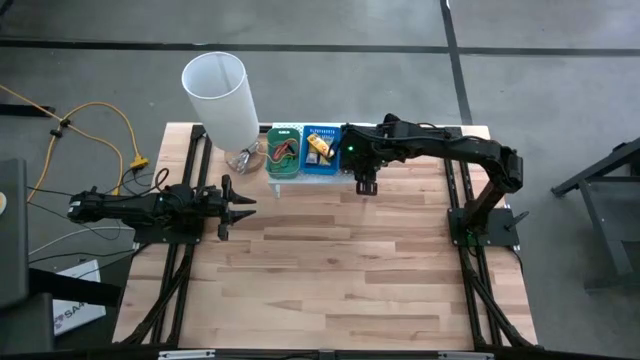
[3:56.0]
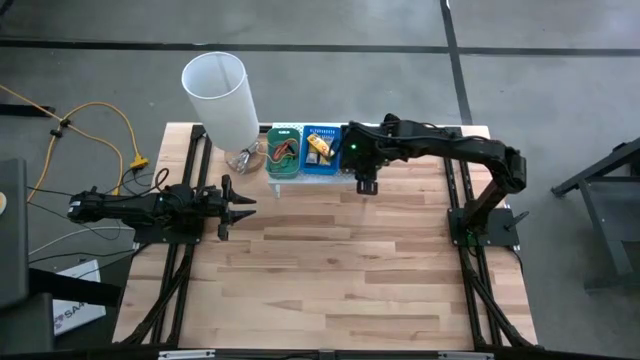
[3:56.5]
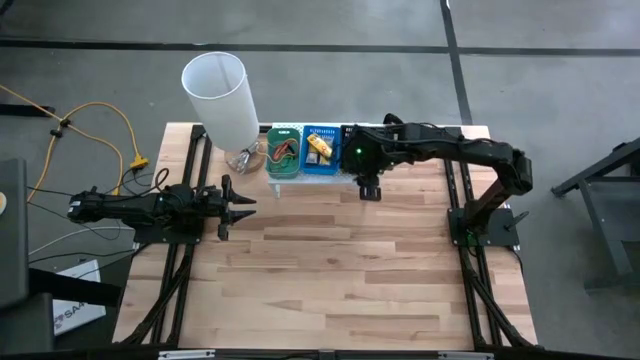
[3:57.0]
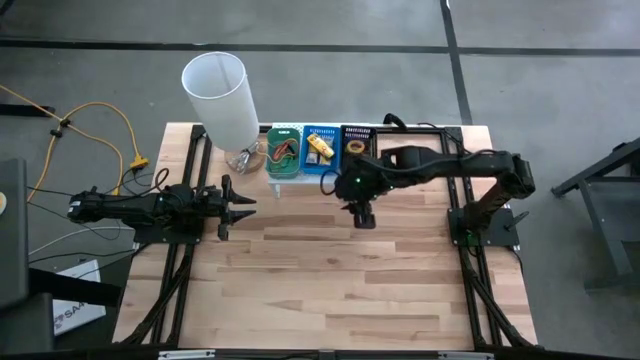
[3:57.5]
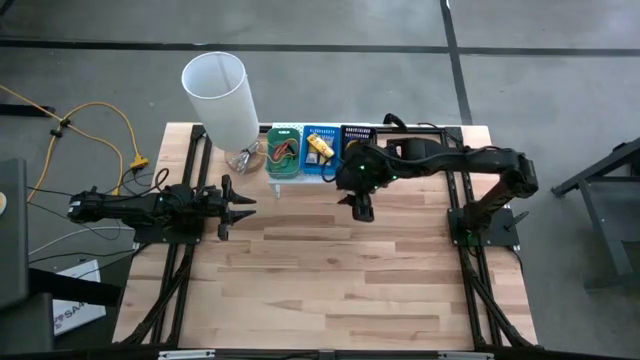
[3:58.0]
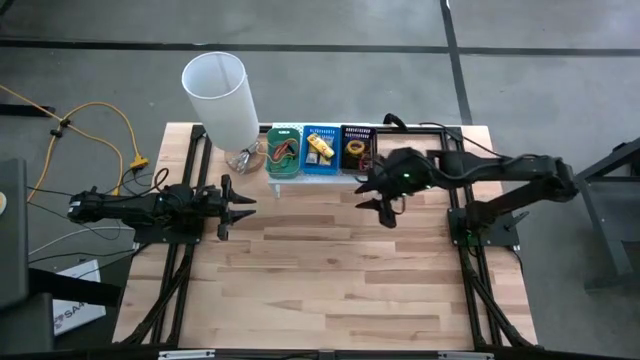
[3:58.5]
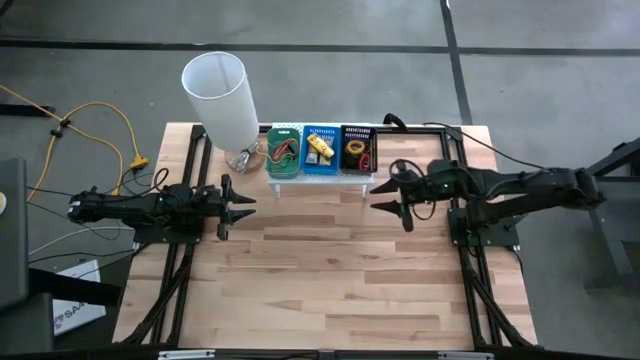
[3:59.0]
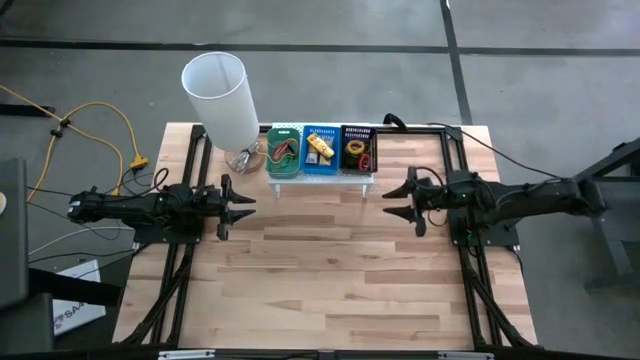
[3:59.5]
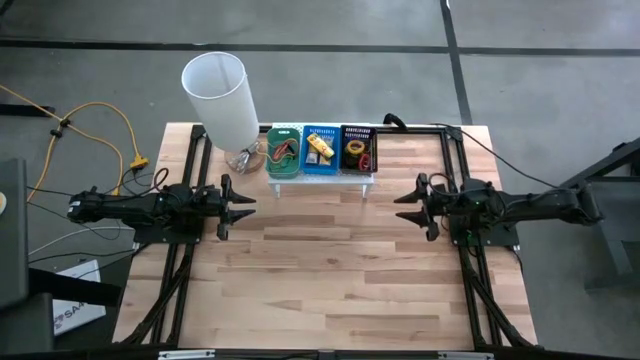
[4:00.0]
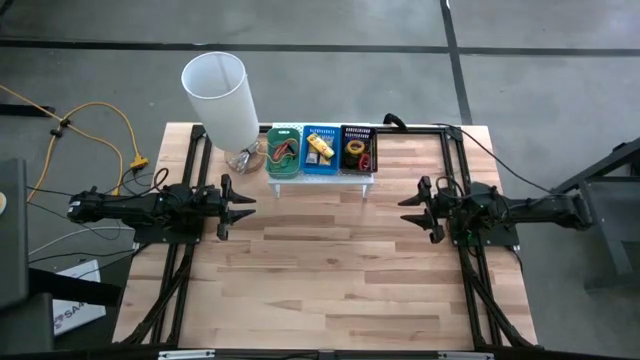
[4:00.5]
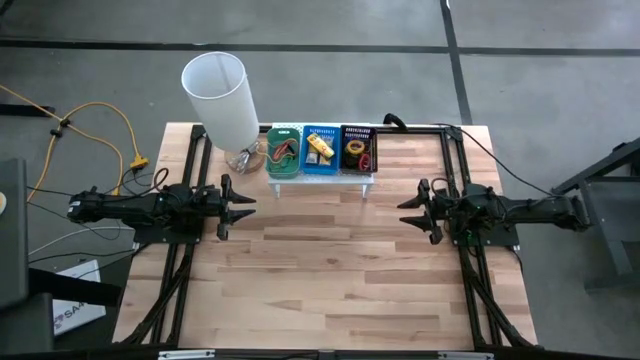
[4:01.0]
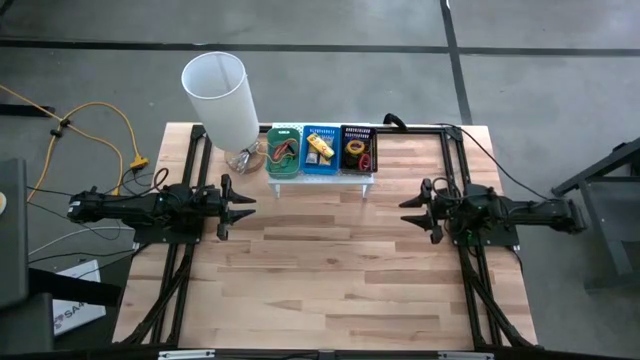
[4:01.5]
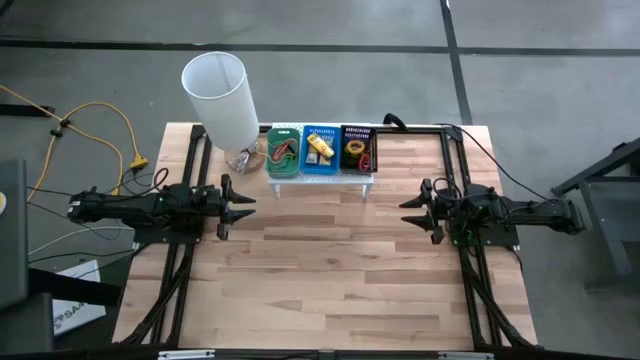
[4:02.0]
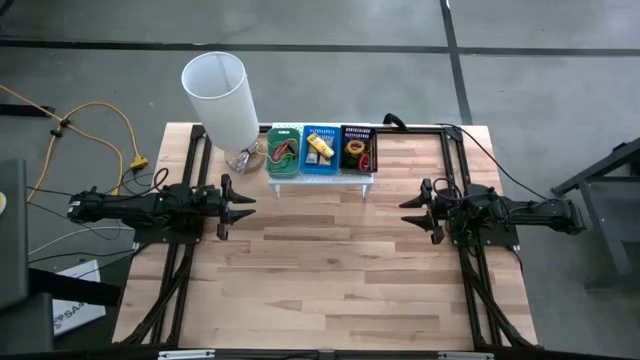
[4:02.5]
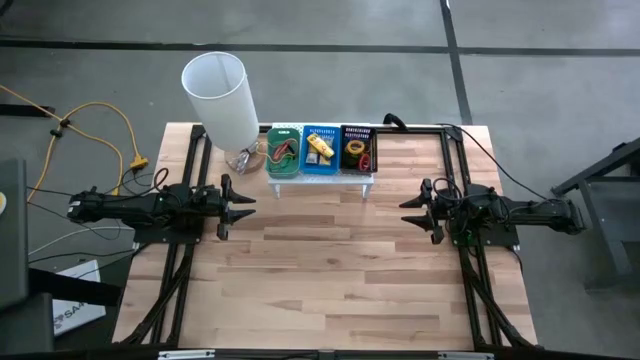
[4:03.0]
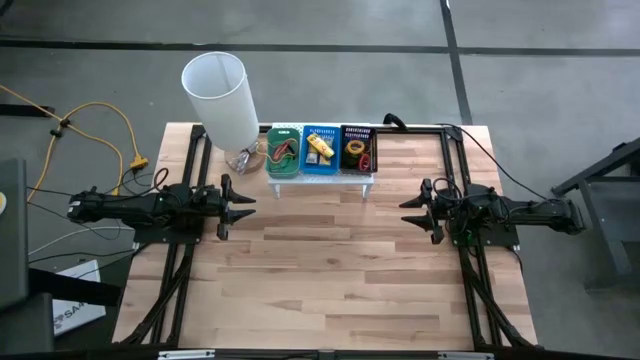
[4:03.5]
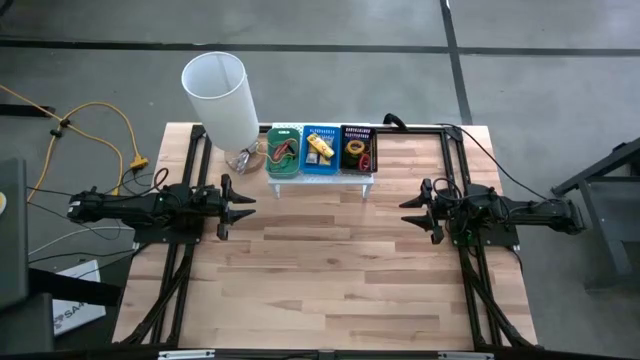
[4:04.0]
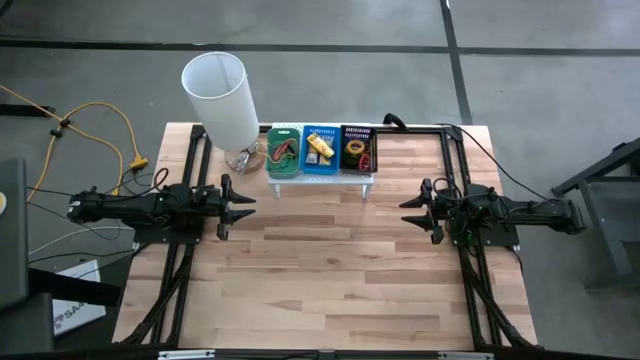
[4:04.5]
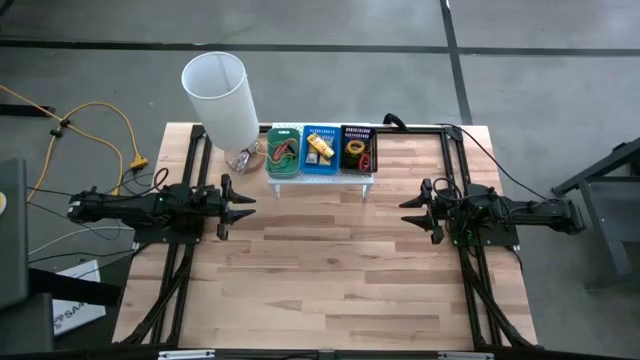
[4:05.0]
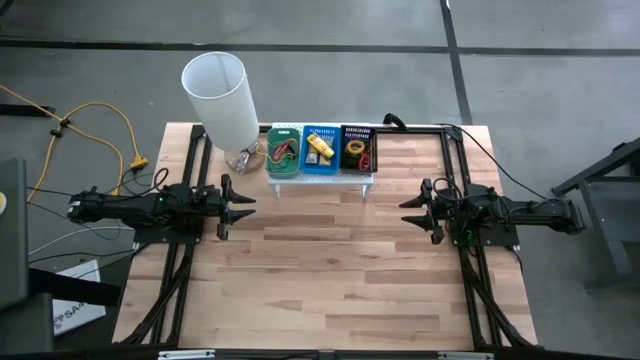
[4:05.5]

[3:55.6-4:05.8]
Task: Pick & Place Office Desk Supplies
Return to Home Position

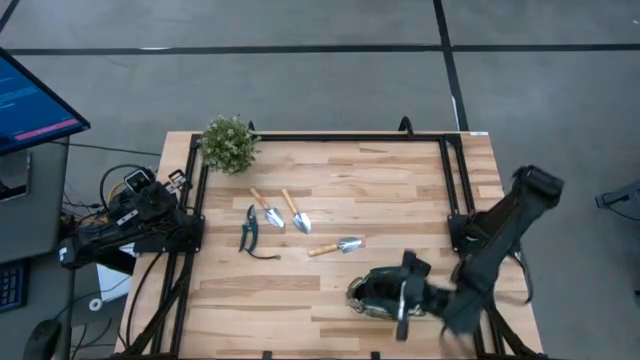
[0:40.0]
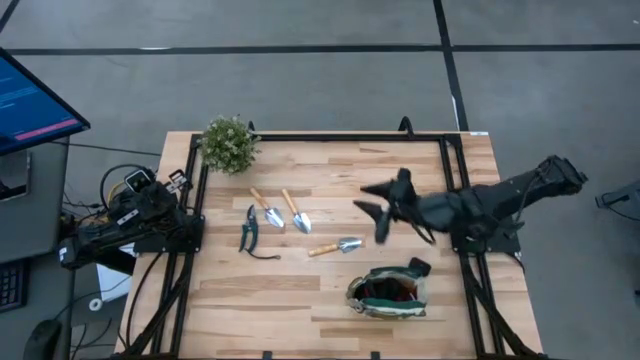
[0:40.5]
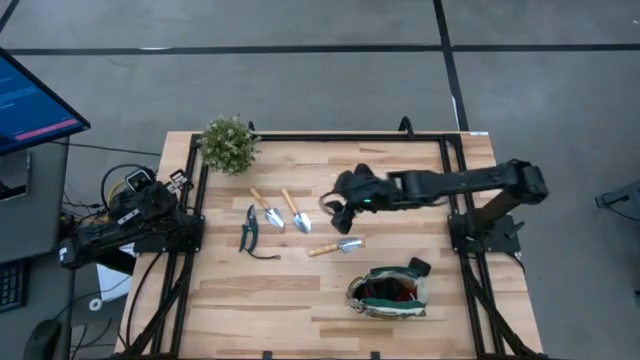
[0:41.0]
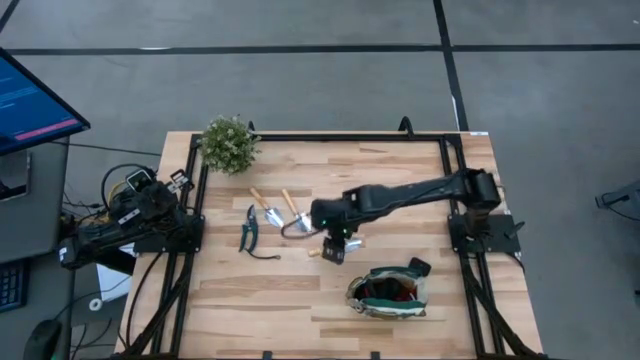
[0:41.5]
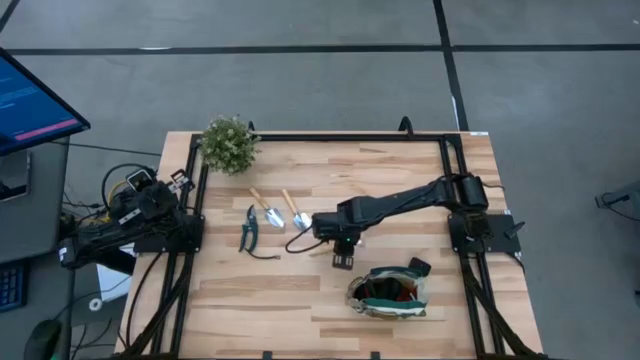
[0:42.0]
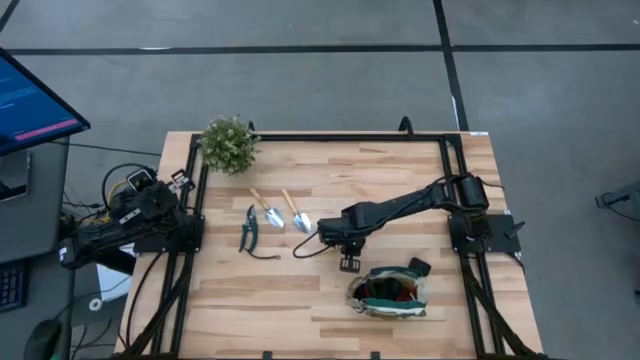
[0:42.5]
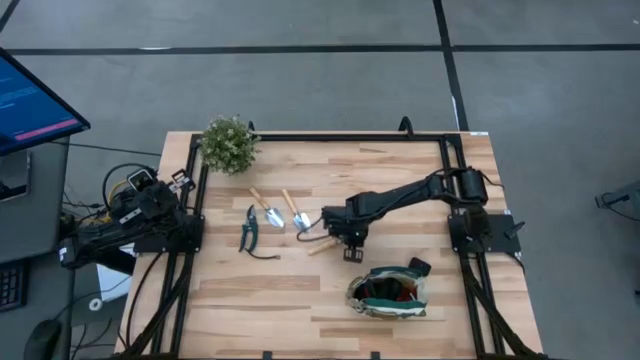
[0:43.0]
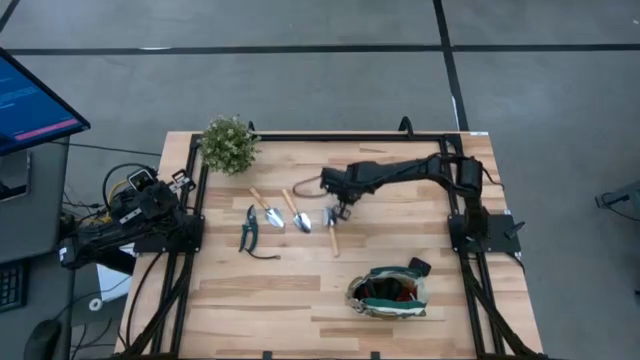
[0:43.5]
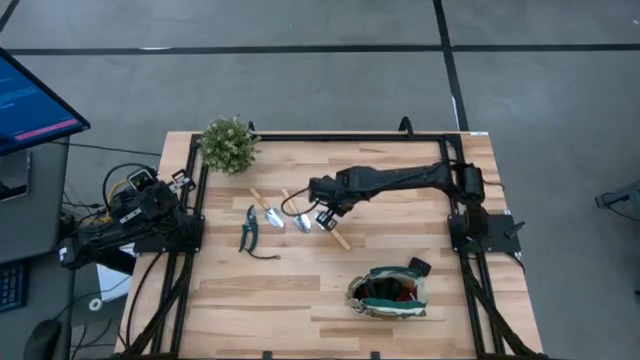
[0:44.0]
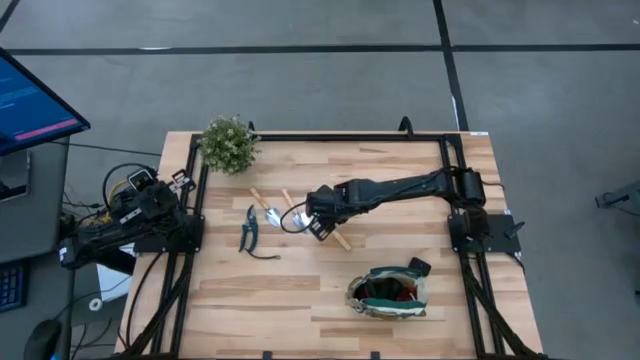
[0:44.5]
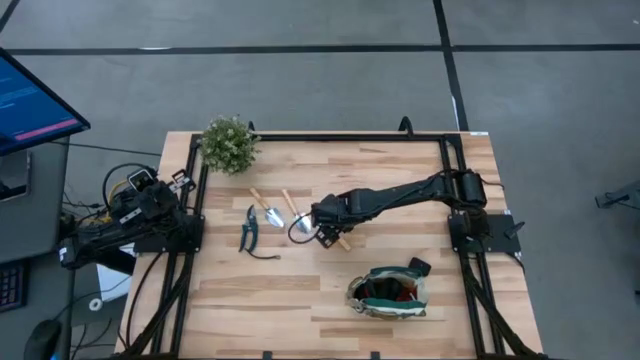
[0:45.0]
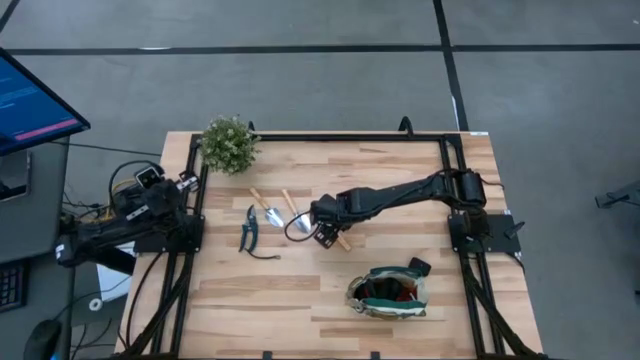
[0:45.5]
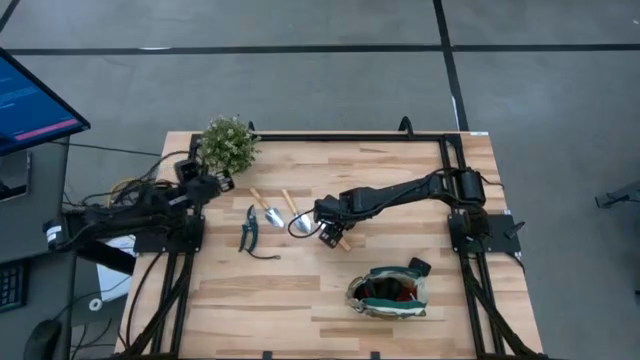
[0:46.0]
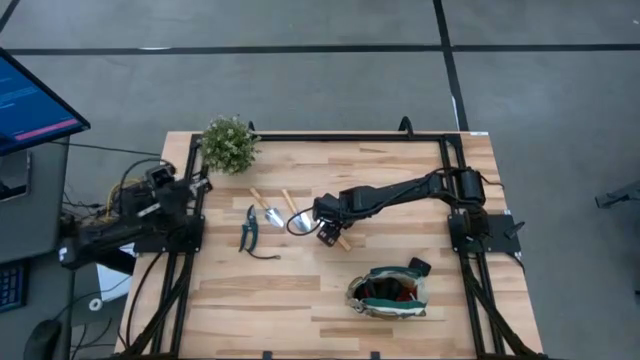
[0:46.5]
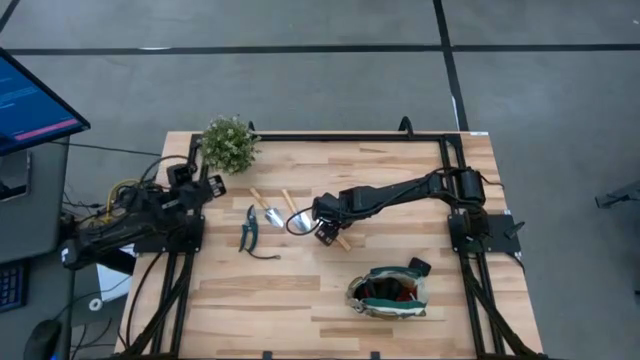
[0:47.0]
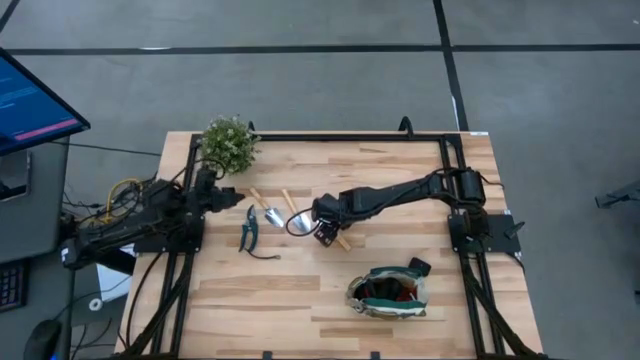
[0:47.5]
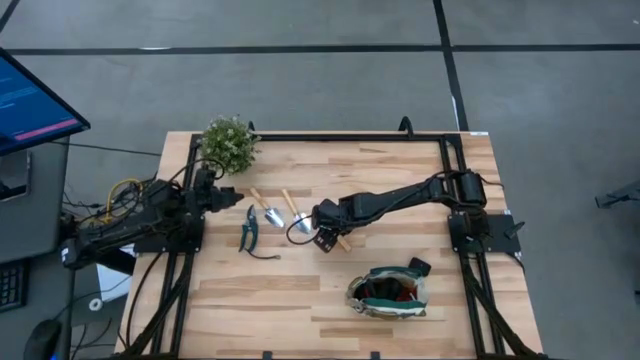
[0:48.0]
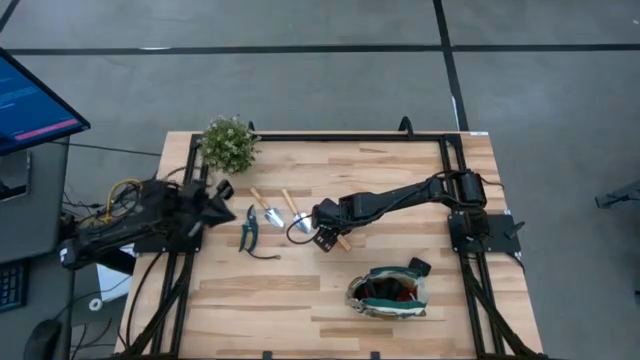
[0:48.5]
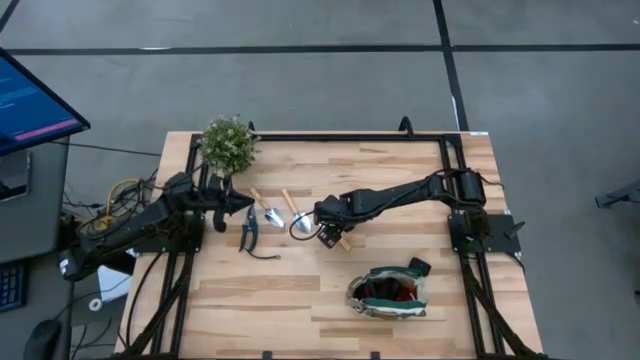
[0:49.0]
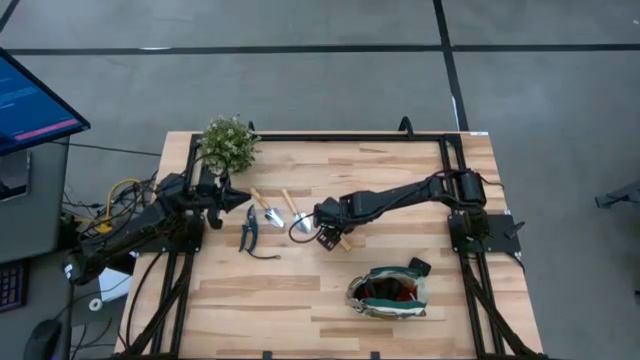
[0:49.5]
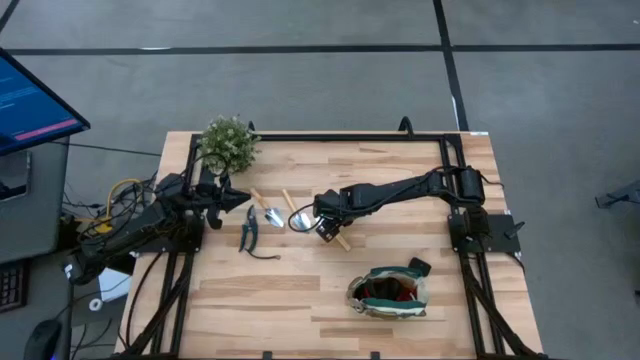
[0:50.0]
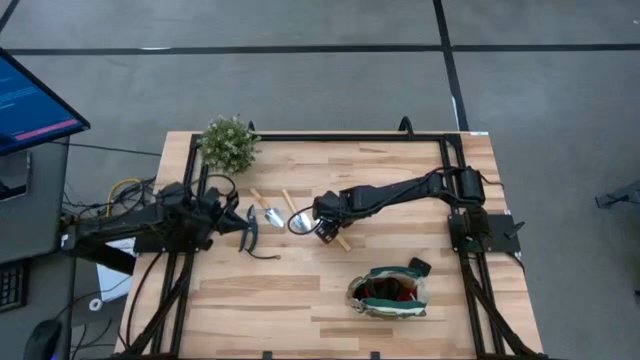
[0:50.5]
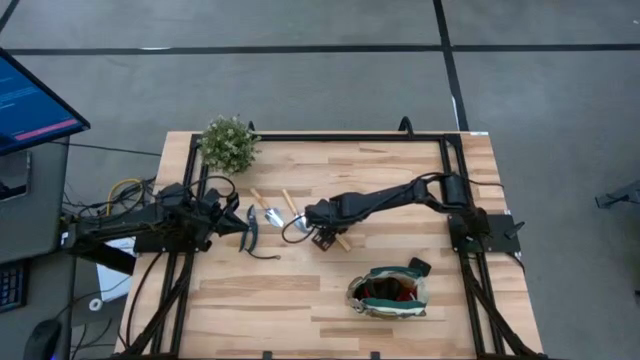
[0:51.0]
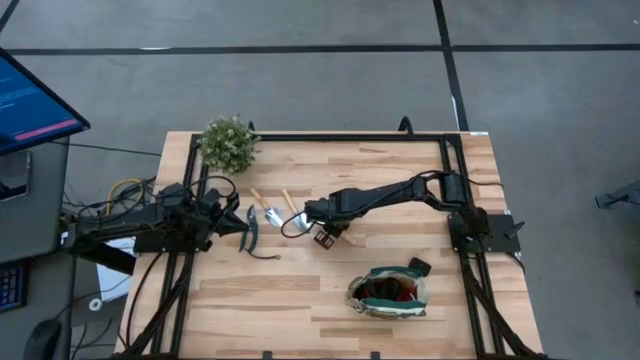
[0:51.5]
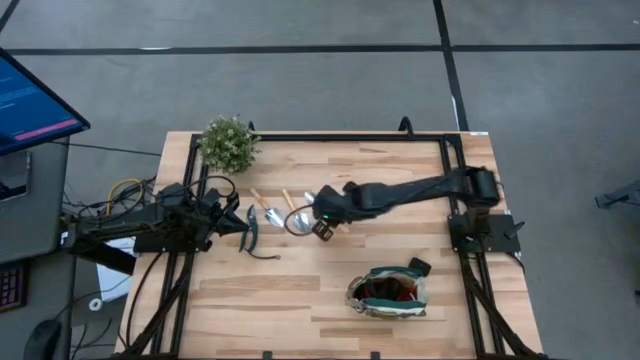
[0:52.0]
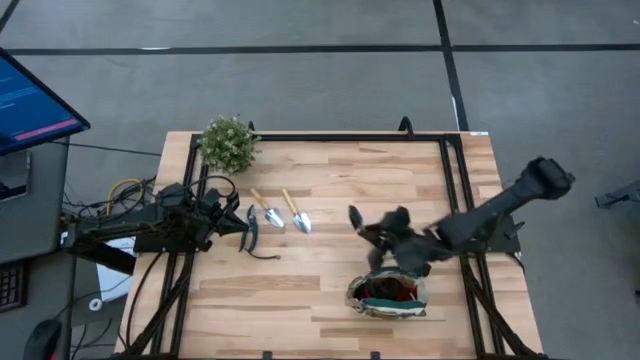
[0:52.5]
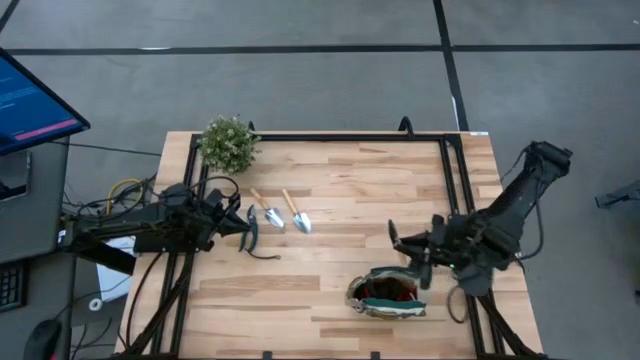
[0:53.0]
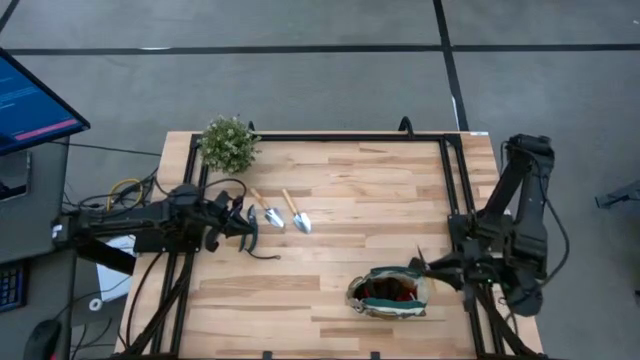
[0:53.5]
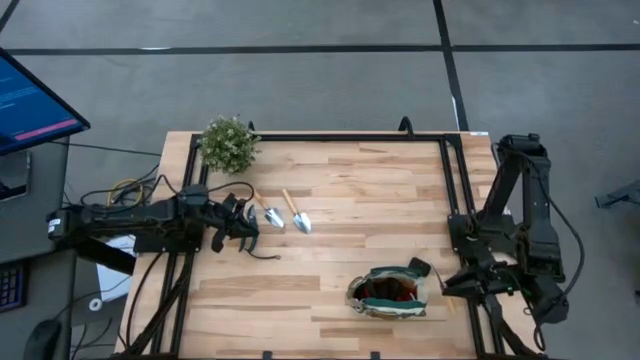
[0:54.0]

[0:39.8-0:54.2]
Task: Pick & Place Garden tools in Gardening bag
Put the brown trowel into the gardening bag
